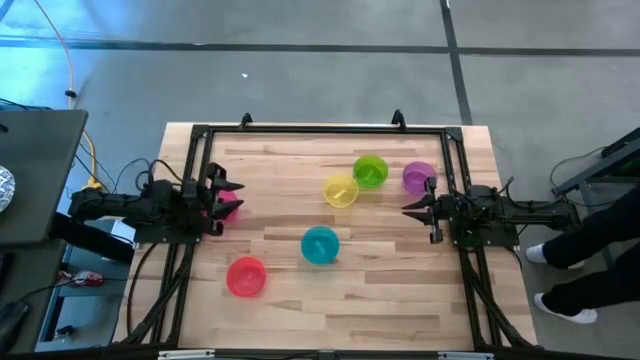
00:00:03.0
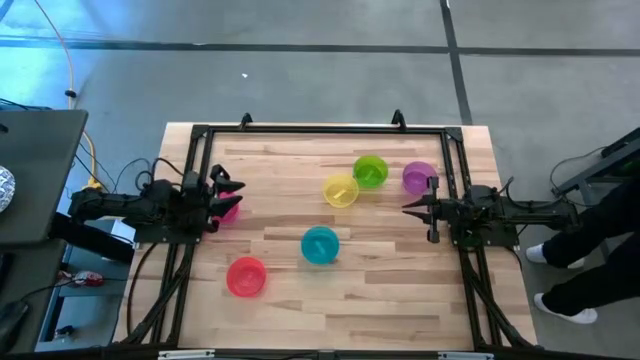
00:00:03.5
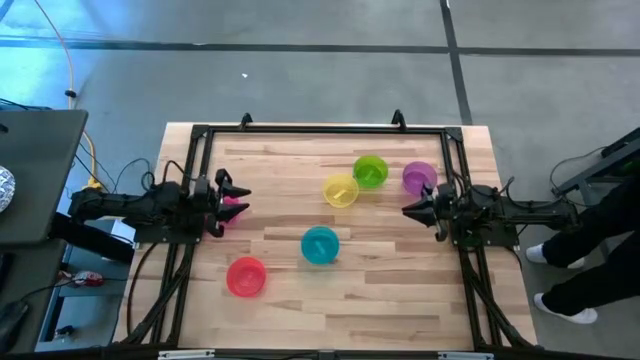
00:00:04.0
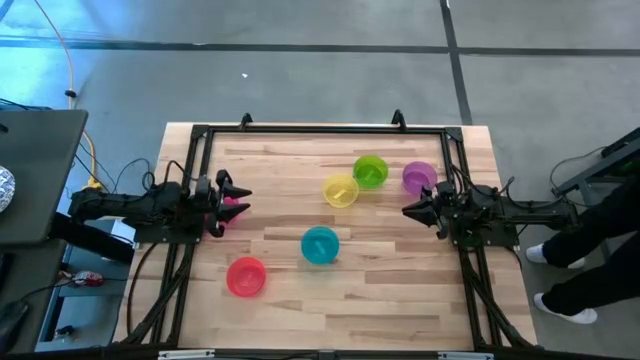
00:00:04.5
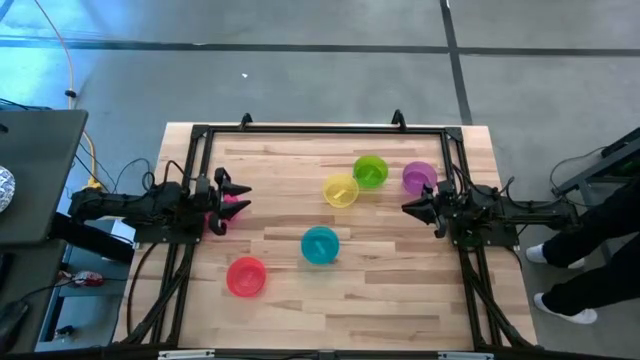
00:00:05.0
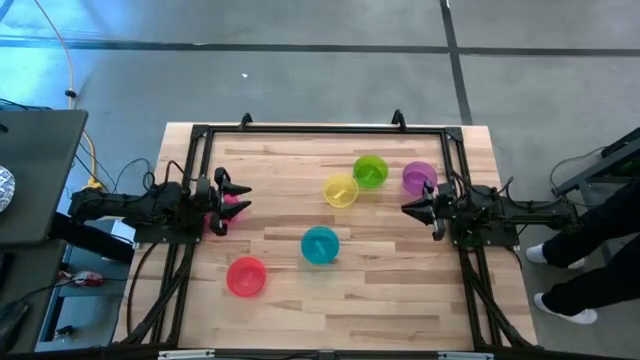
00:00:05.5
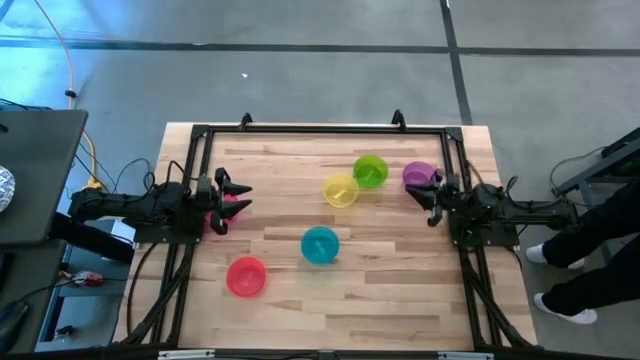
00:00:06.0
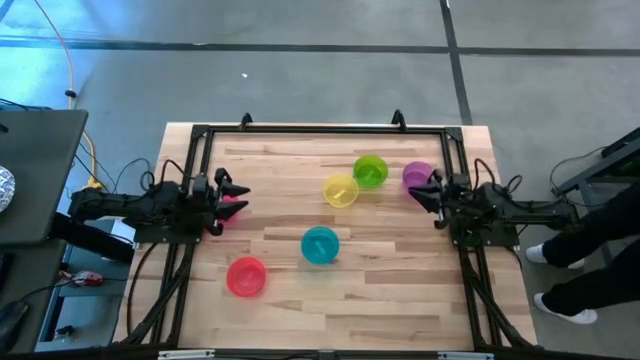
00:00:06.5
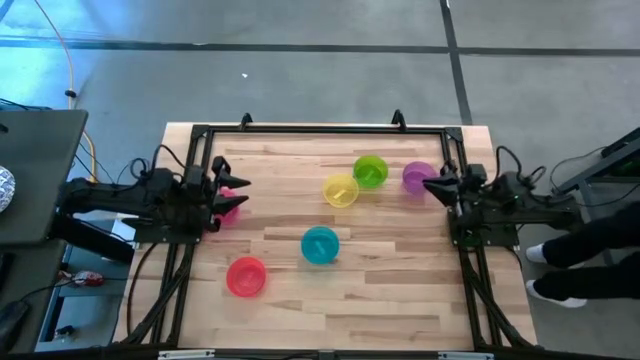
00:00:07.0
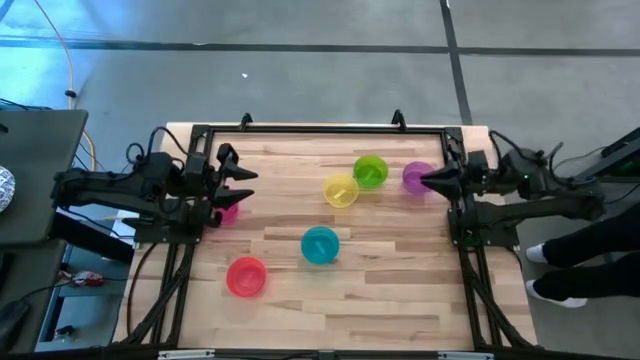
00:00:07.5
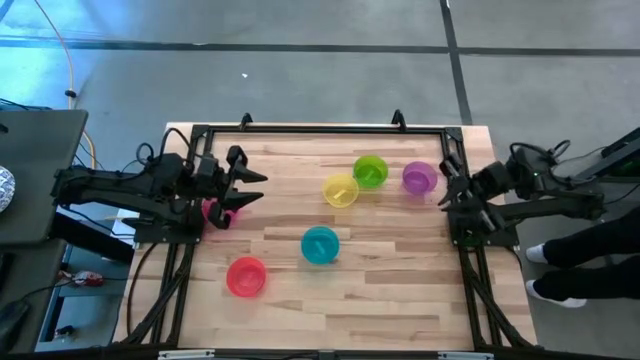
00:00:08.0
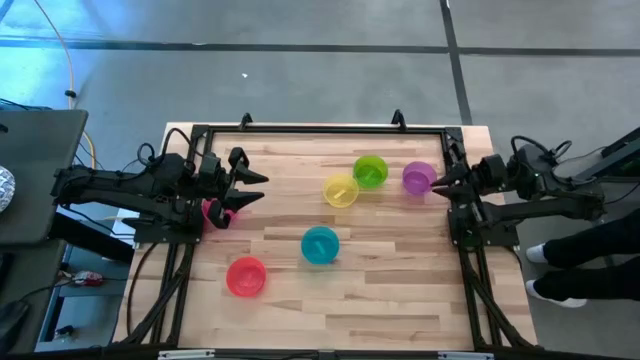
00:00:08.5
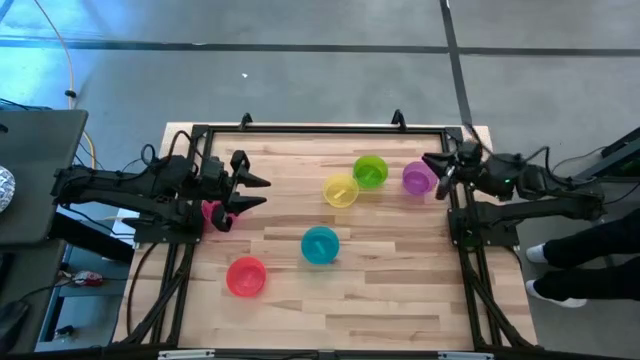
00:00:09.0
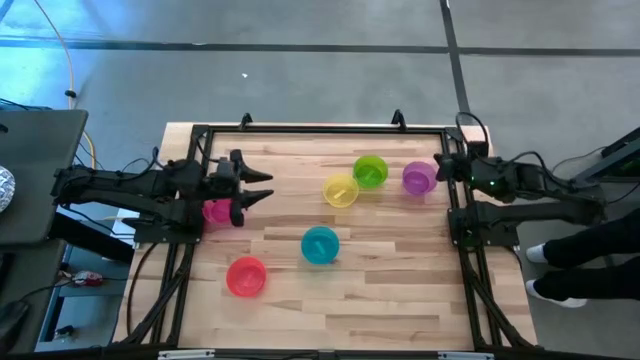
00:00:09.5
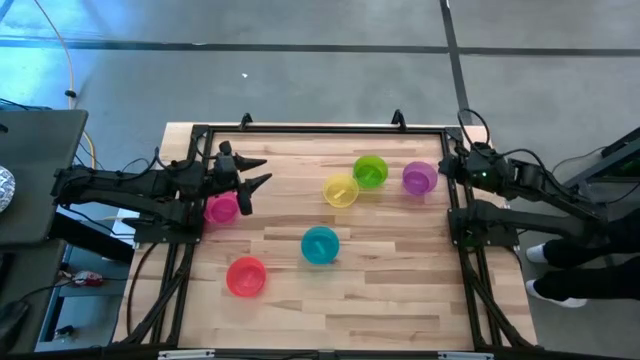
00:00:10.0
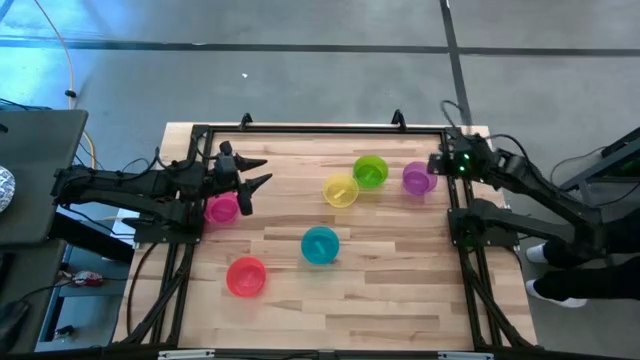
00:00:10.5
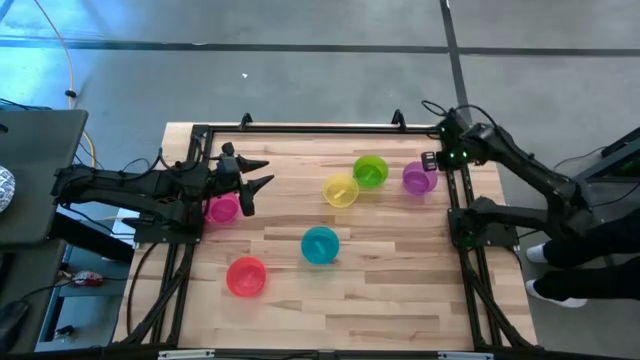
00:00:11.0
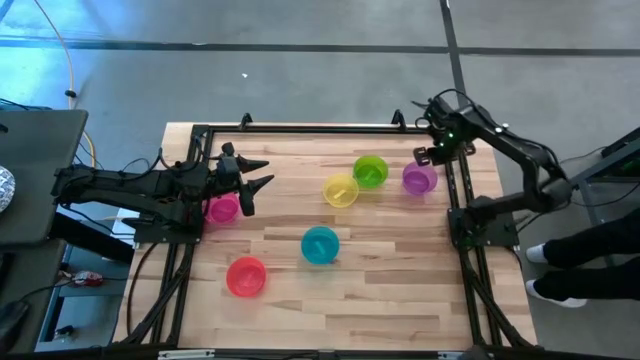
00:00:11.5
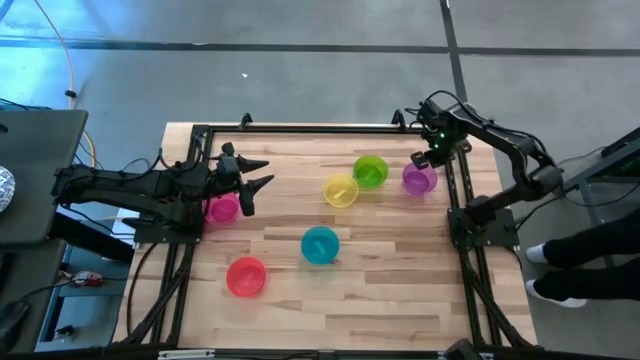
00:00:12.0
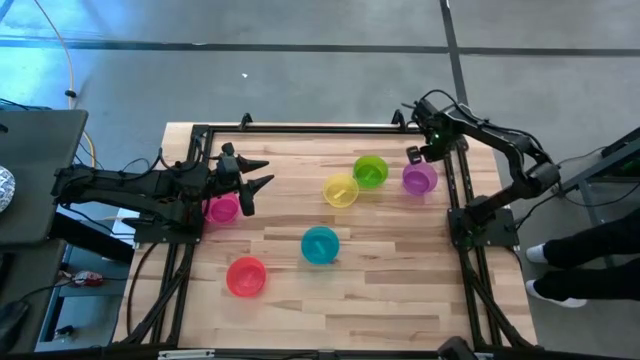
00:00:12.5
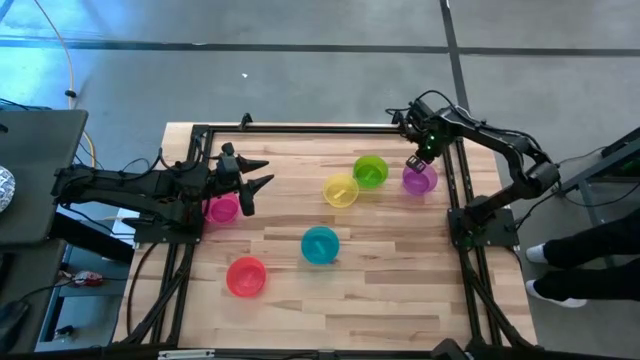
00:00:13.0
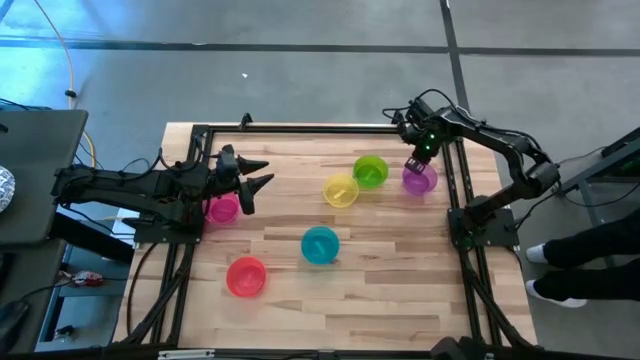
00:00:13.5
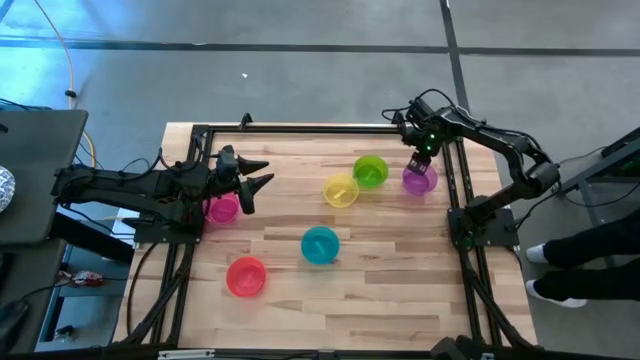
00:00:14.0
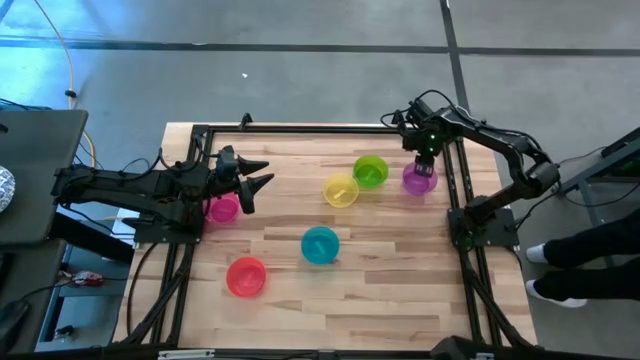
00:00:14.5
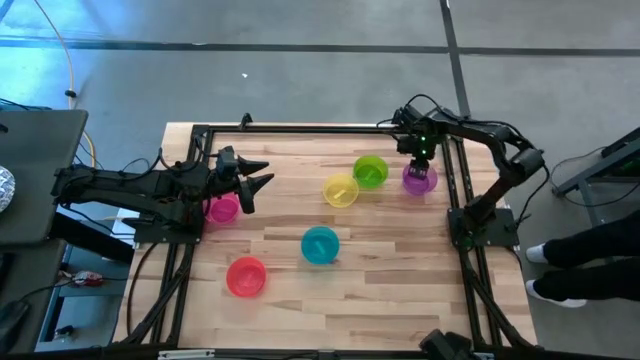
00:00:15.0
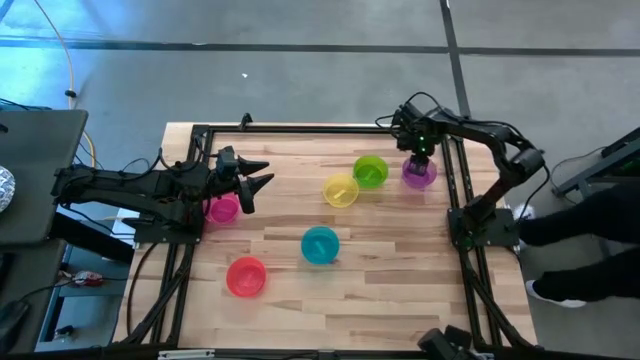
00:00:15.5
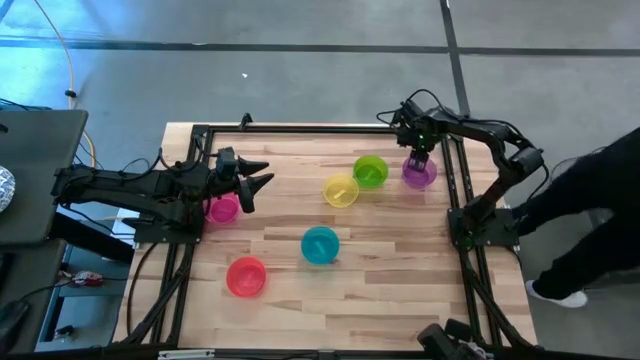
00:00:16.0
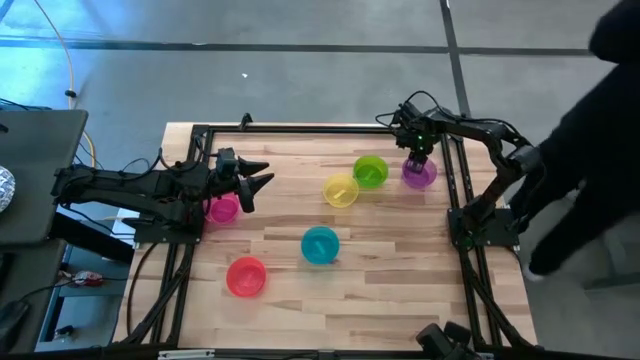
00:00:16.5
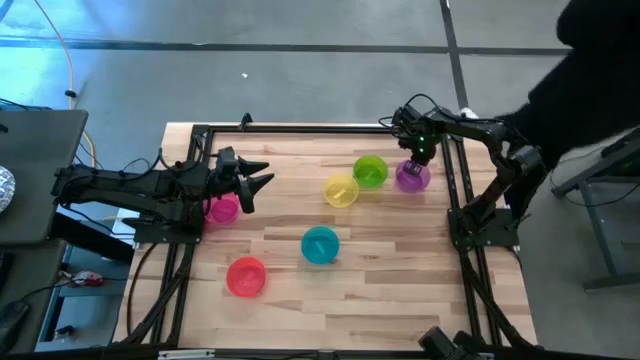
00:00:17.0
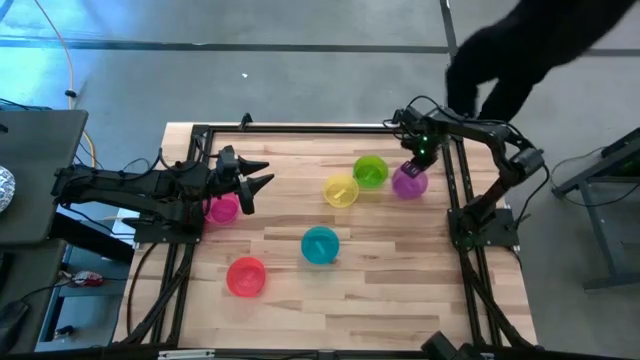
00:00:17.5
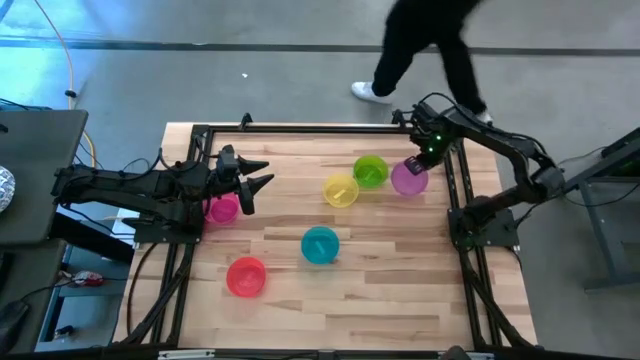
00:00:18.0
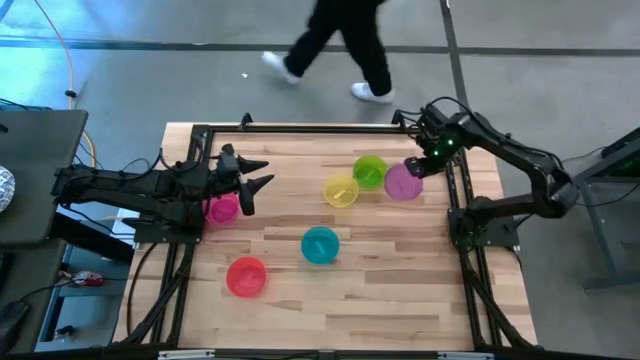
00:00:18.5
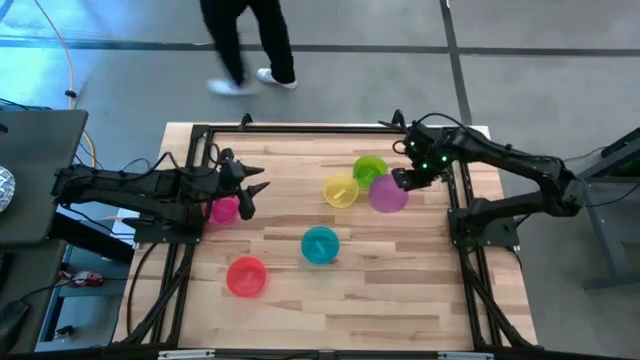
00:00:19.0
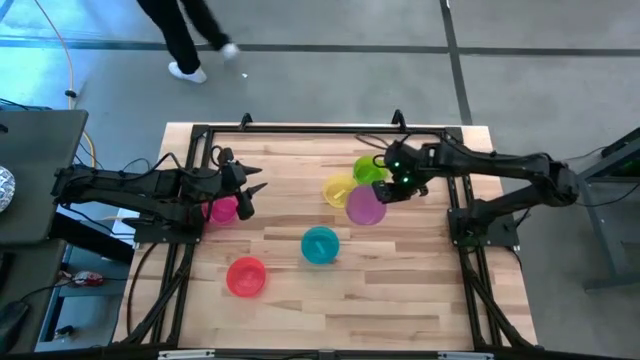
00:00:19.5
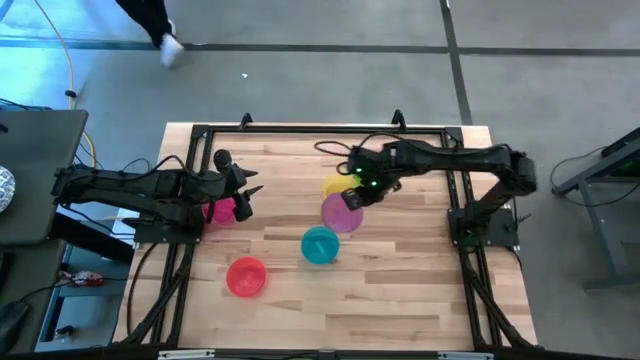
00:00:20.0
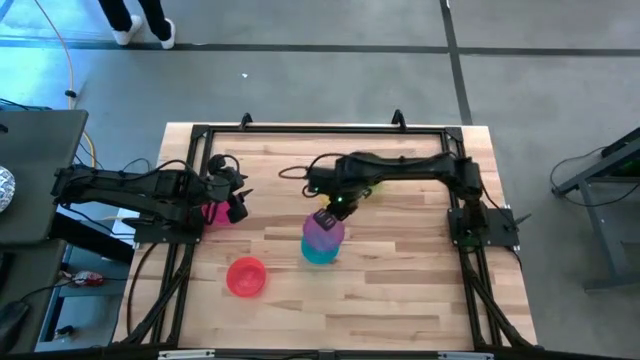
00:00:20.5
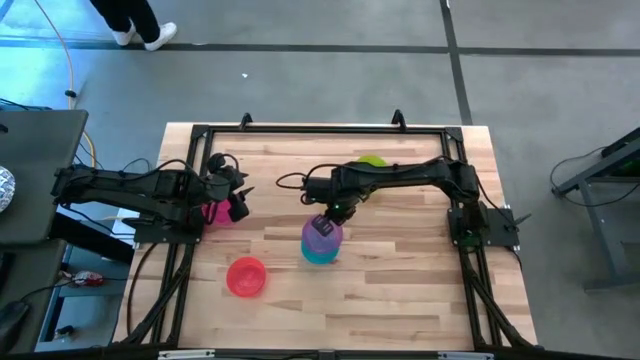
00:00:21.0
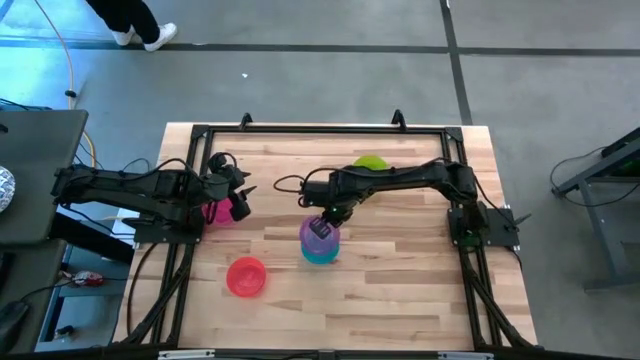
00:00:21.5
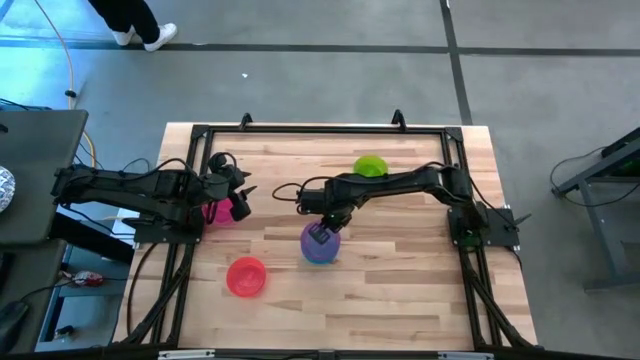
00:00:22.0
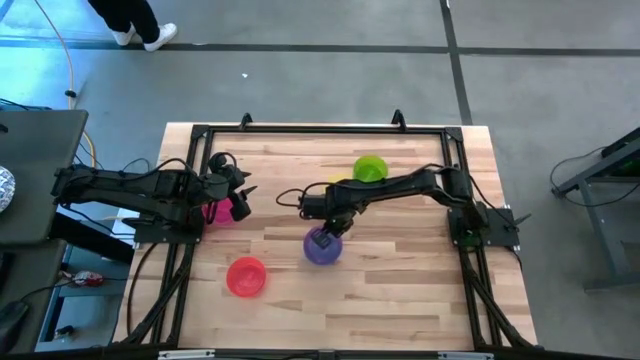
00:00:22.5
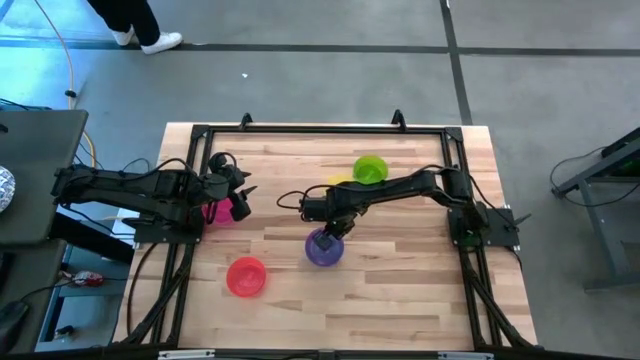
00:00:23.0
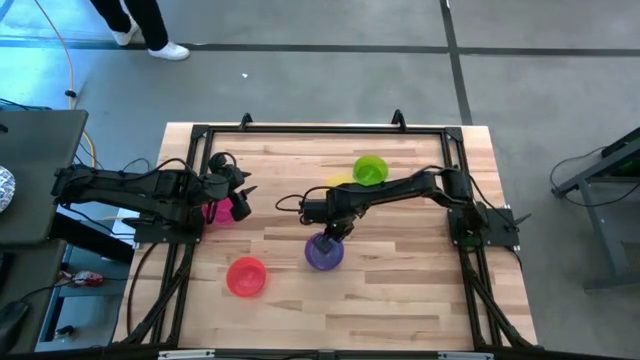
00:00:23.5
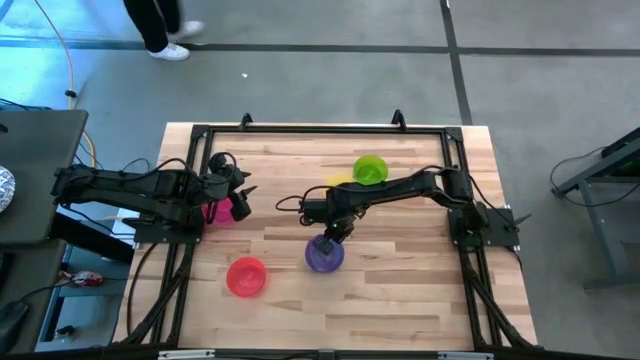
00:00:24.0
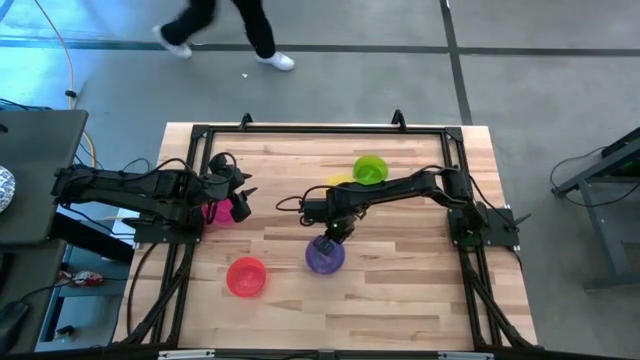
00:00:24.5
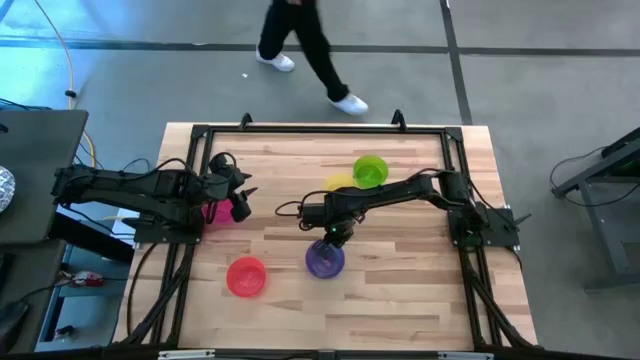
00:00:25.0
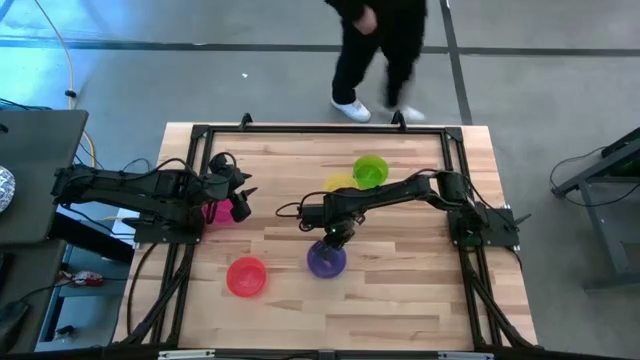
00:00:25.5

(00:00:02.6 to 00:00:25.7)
Task: Nest bowls inside each other
Stack the purple bowl on the blue bowl
